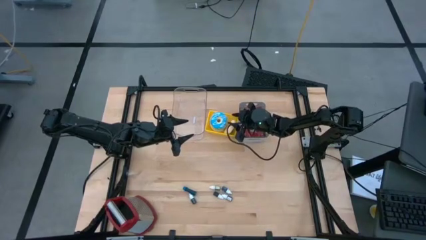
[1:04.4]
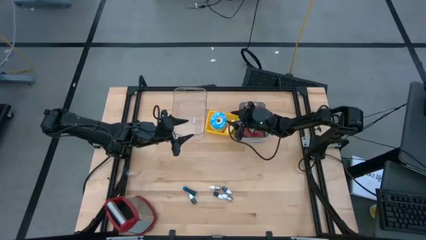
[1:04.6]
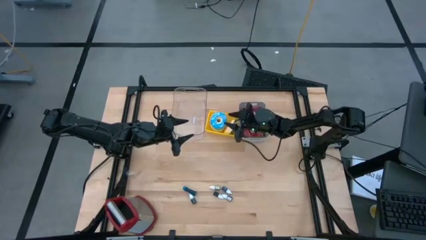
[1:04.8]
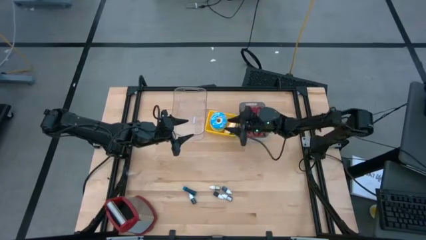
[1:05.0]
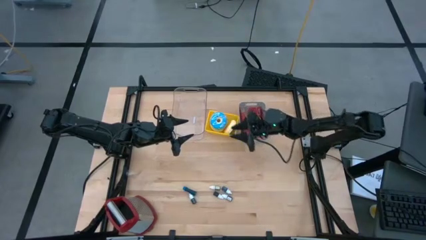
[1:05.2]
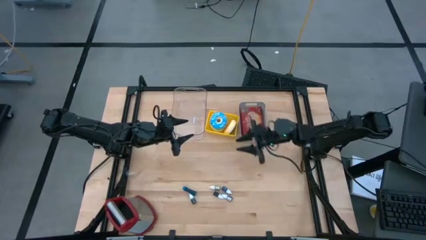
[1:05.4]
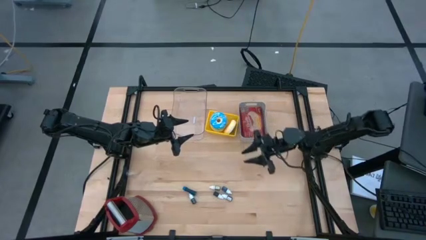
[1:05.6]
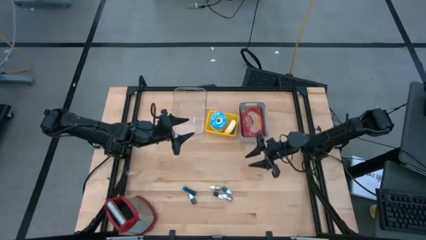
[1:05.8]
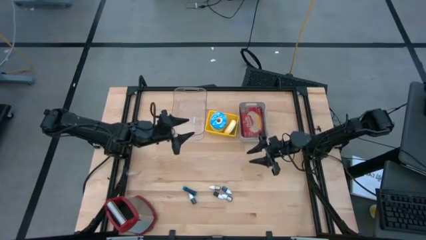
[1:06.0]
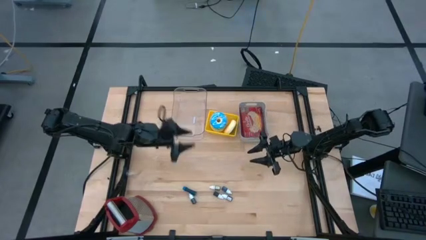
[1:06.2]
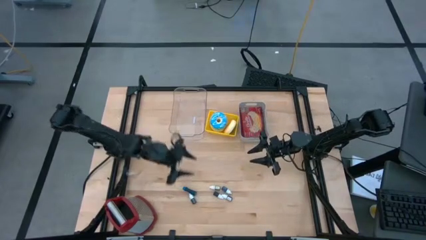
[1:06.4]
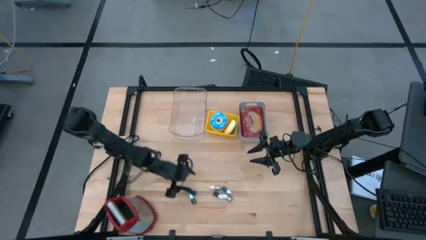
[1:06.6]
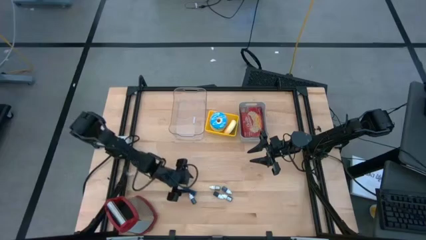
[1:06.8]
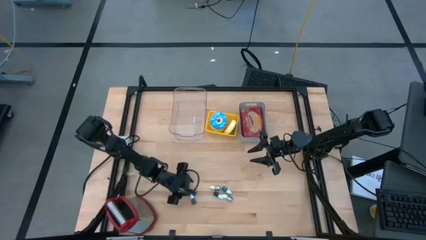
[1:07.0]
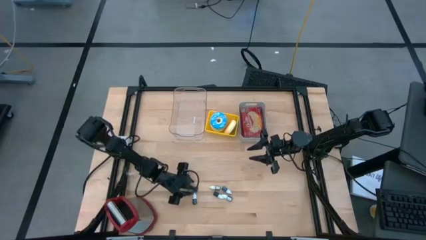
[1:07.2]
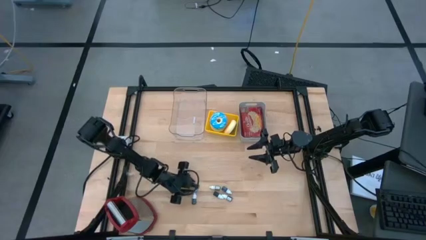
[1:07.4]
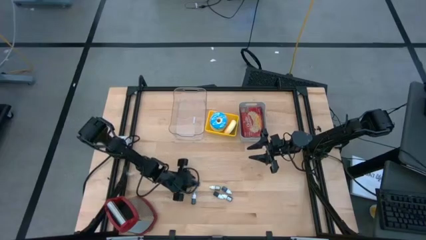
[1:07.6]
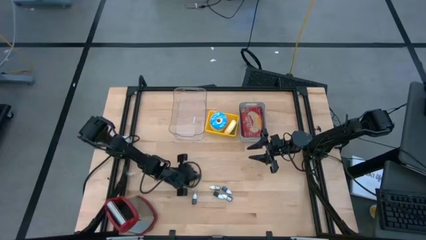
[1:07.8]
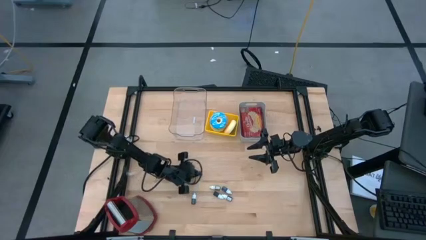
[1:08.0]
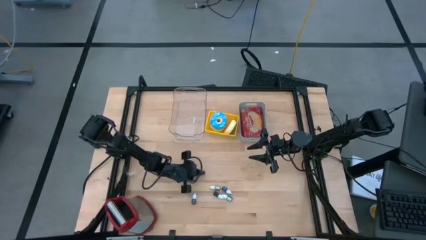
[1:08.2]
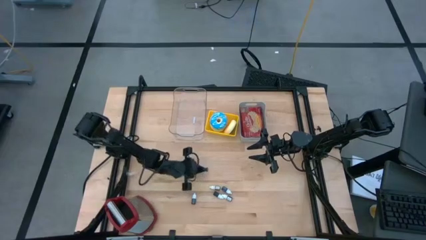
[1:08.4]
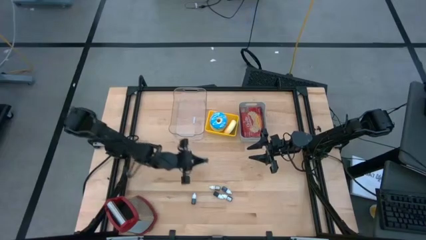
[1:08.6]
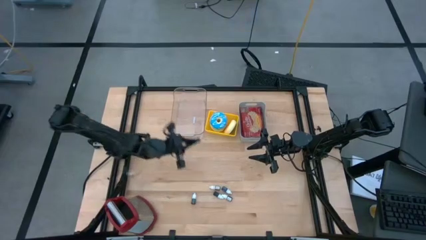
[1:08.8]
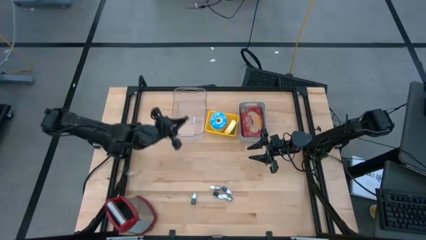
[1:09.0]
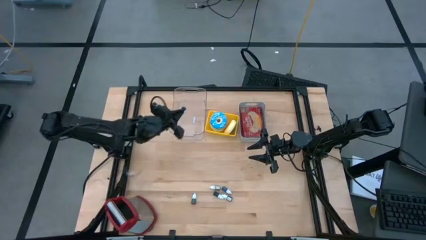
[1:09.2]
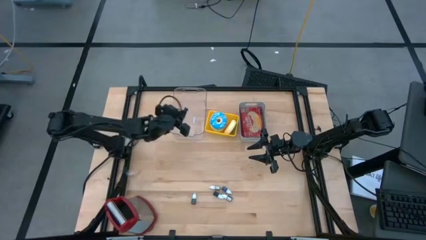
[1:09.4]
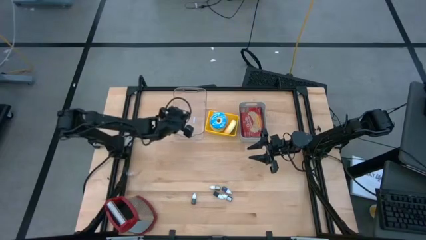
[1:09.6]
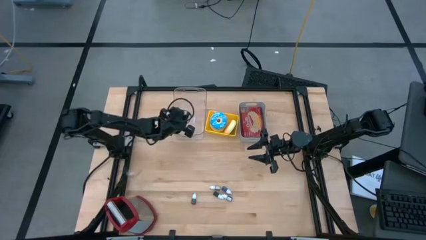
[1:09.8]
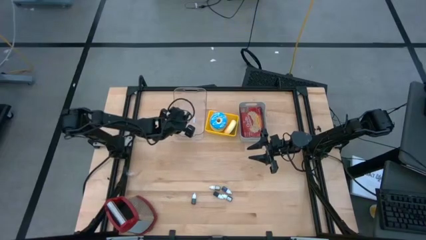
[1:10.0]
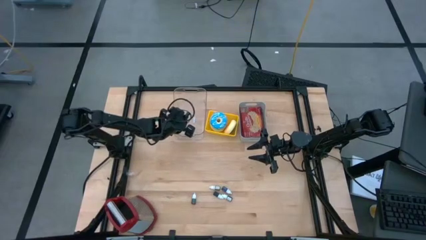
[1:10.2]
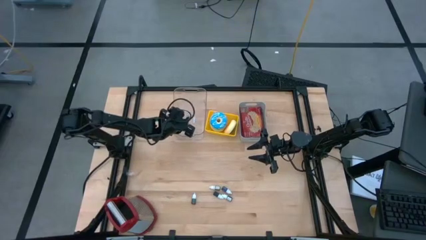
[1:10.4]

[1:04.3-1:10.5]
Put the blue food coloring bottle into the transparent bin

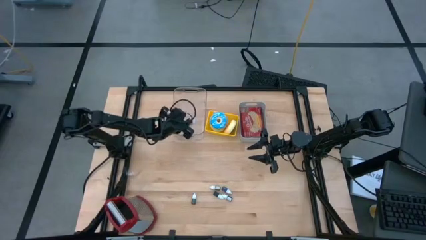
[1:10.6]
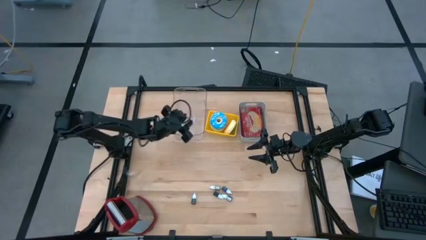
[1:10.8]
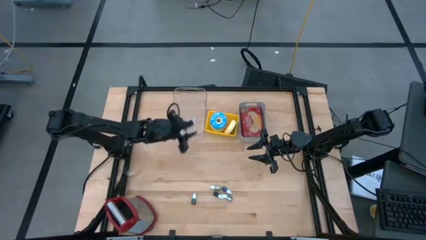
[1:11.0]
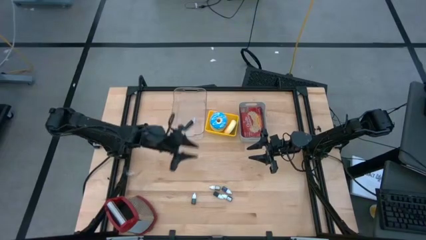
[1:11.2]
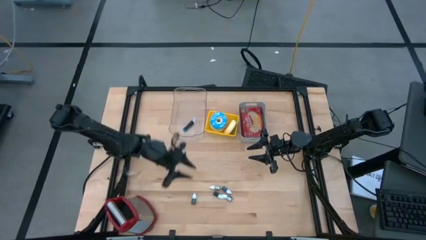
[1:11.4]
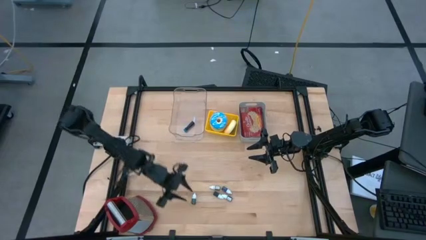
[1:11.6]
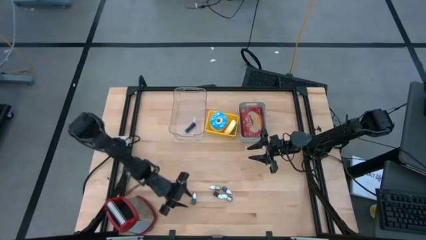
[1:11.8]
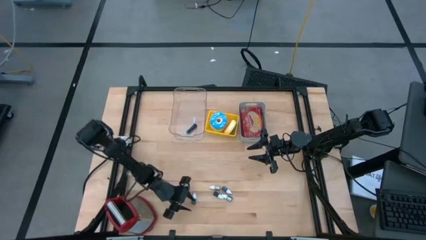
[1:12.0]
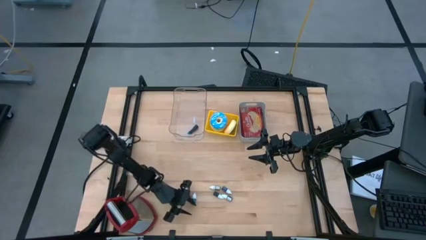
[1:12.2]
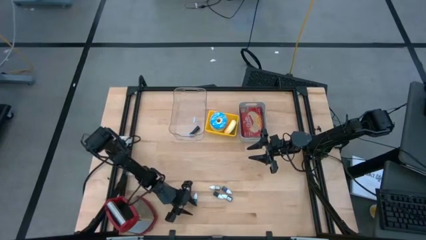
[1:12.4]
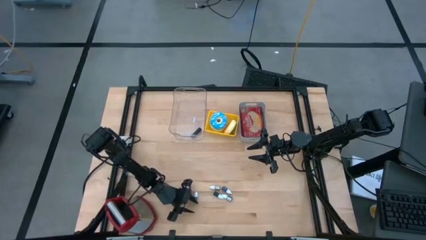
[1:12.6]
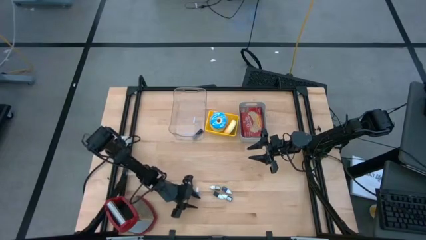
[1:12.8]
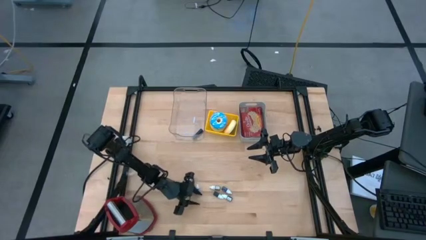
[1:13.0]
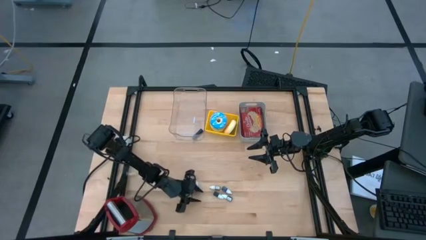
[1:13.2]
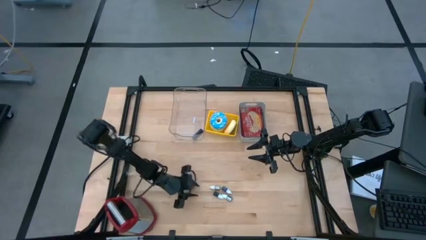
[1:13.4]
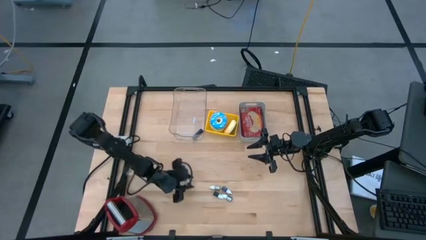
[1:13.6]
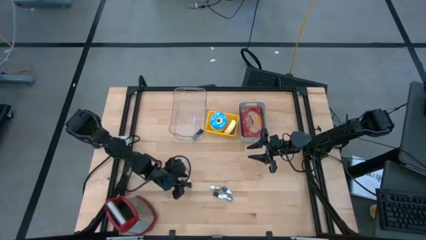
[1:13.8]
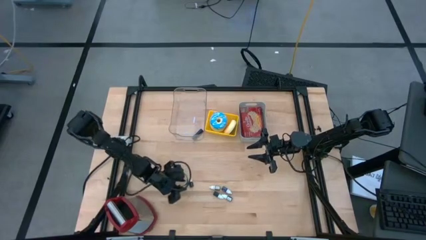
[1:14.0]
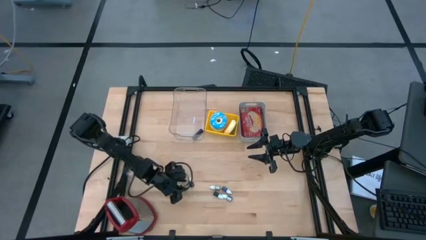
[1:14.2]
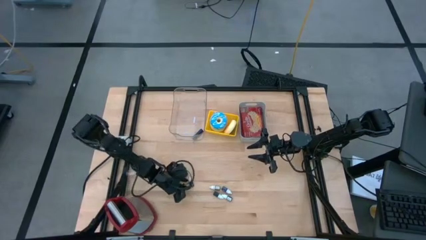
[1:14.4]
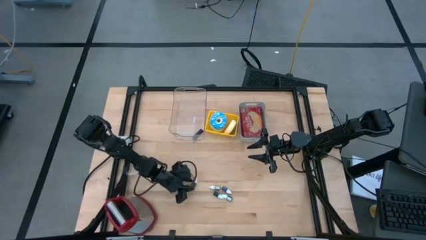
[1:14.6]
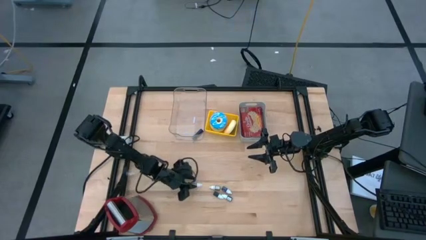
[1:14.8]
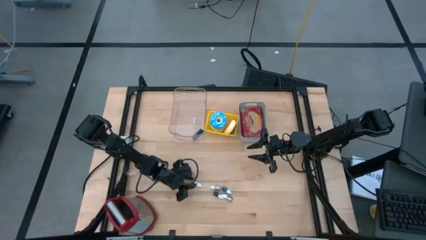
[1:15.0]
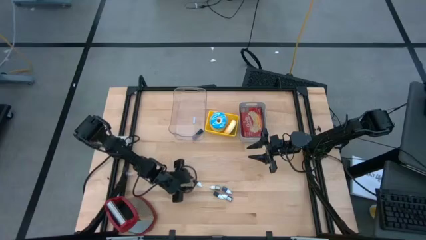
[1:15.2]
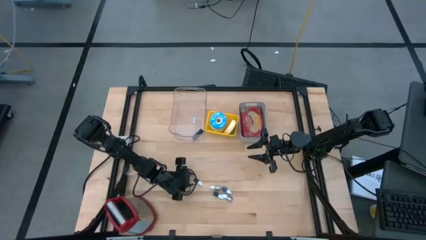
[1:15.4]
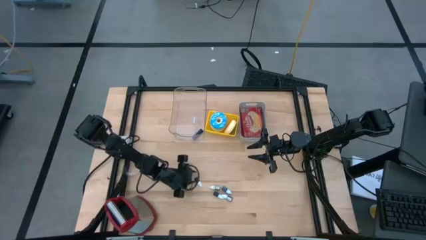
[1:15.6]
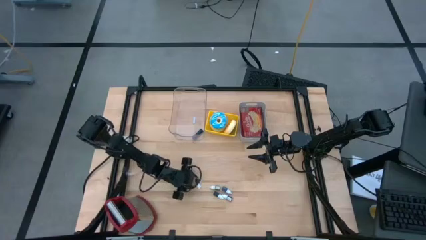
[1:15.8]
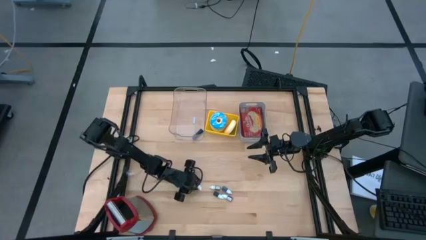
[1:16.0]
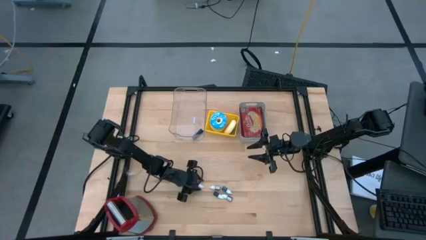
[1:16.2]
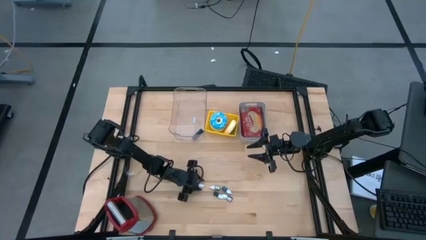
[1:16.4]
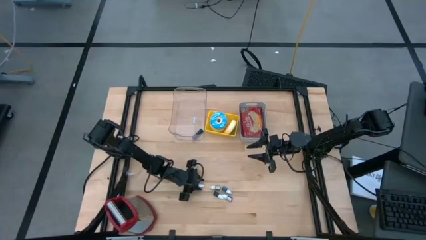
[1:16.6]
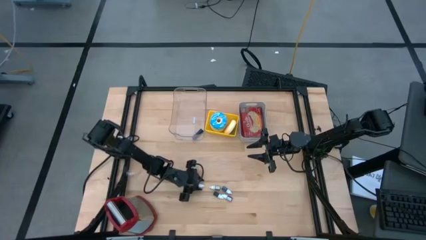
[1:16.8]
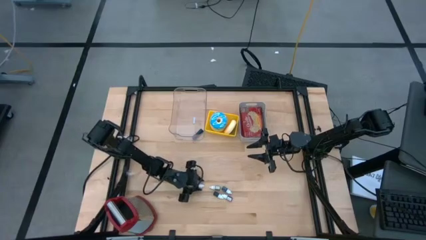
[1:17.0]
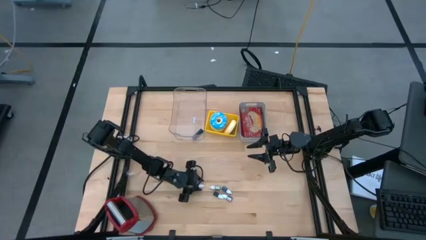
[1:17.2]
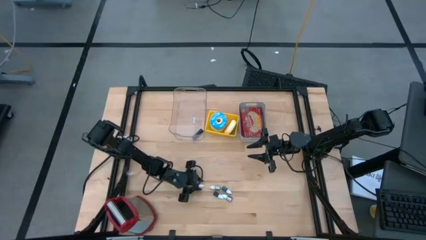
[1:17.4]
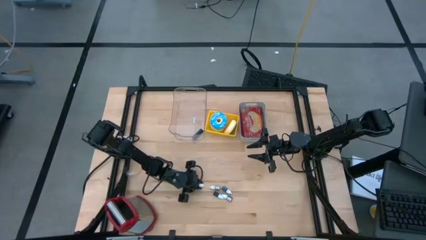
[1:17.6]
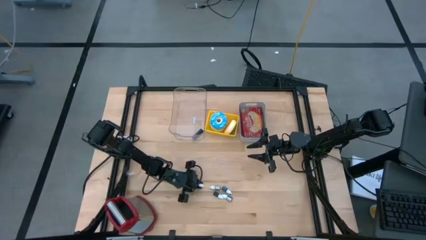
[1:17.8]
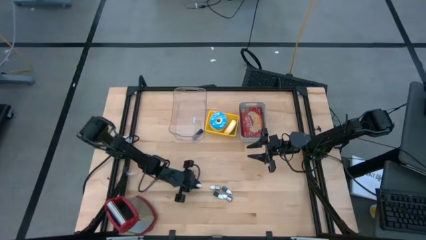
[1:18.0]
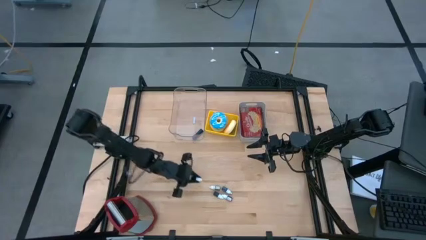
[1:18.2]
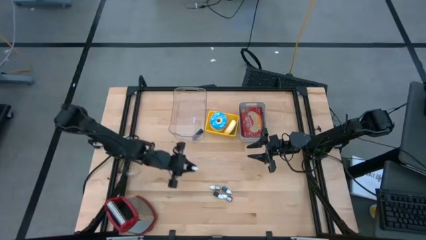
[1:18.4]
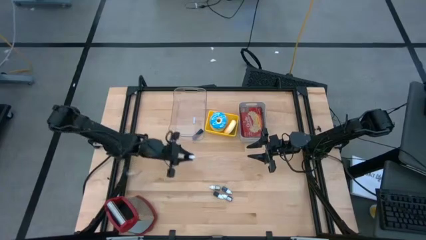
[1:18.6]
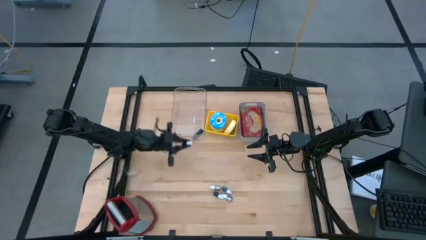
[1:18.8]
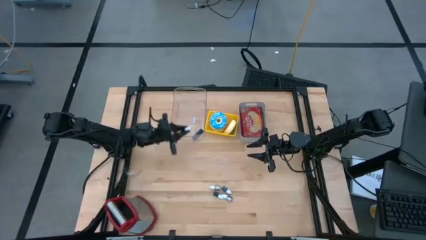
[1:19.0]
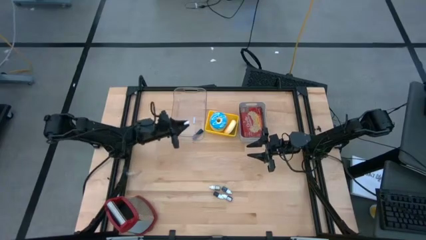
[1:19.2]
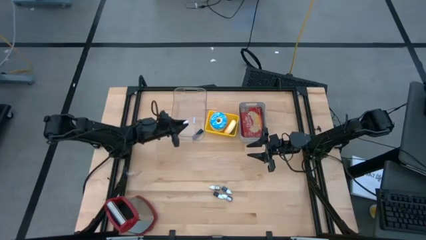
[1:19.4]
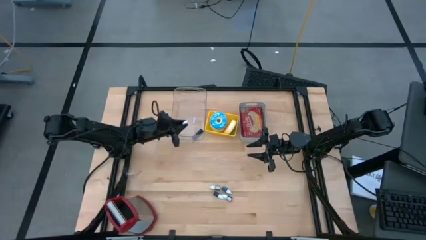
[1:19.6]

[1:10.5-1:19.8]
Put the black food coloring bottle into the transparent bin
